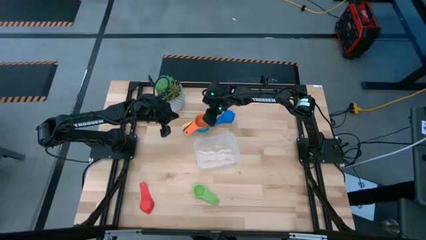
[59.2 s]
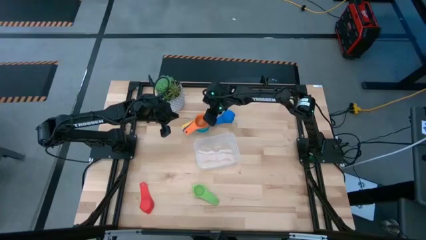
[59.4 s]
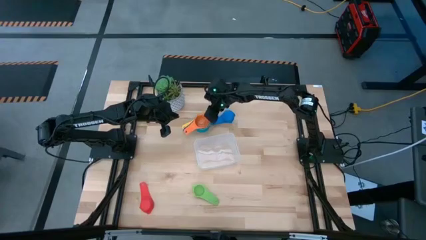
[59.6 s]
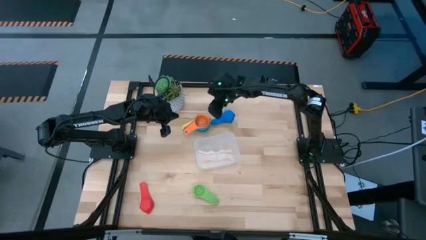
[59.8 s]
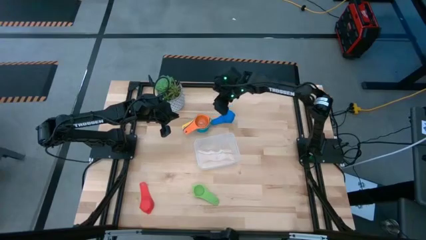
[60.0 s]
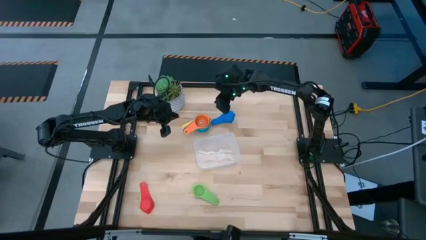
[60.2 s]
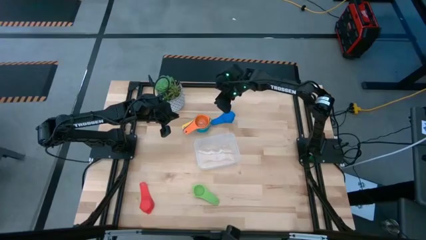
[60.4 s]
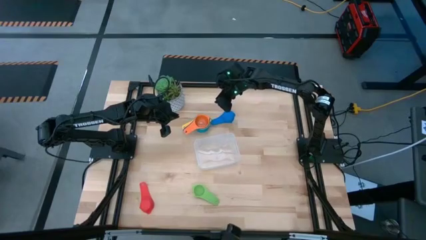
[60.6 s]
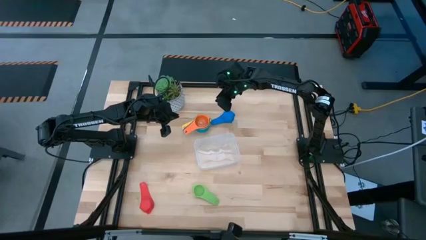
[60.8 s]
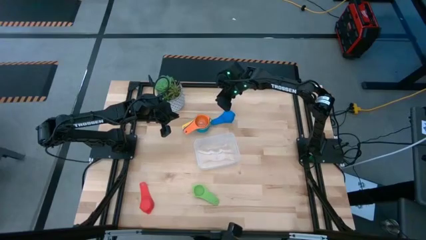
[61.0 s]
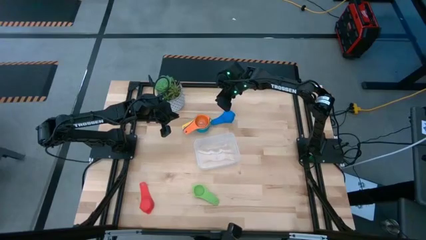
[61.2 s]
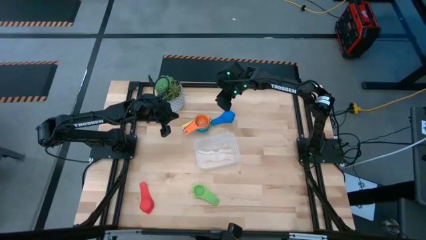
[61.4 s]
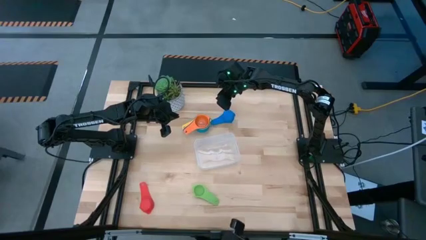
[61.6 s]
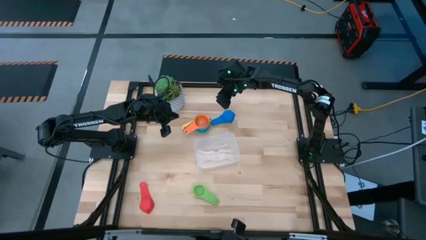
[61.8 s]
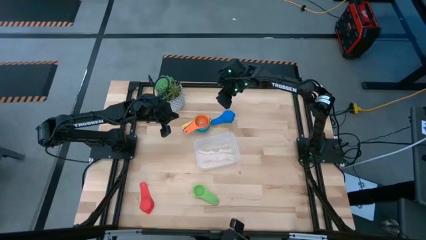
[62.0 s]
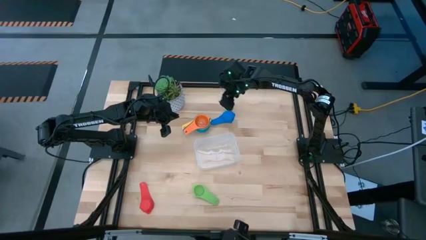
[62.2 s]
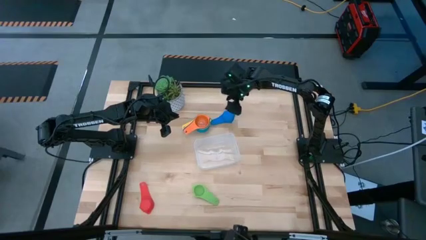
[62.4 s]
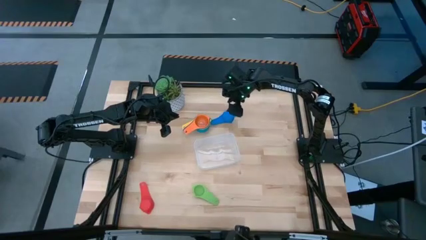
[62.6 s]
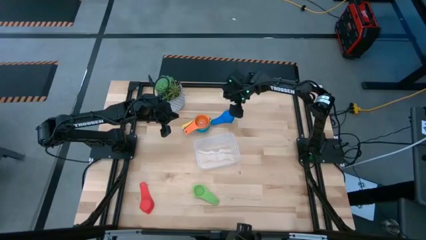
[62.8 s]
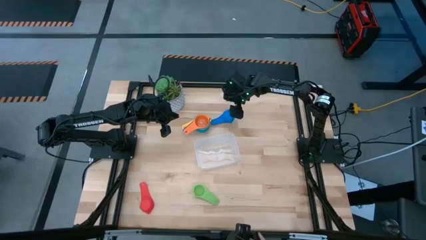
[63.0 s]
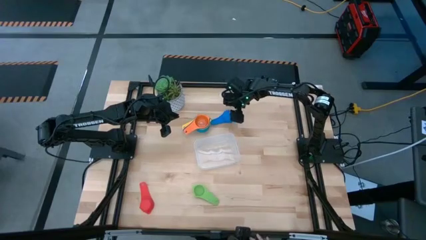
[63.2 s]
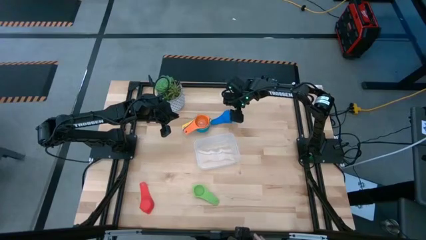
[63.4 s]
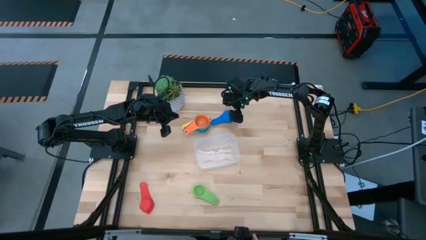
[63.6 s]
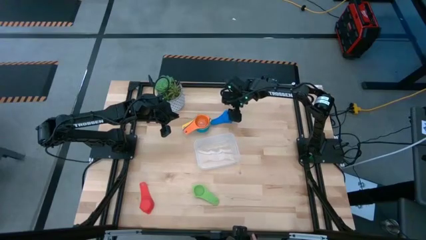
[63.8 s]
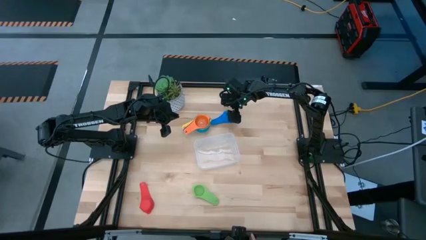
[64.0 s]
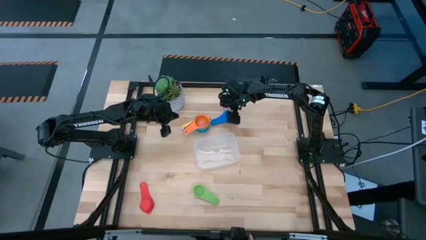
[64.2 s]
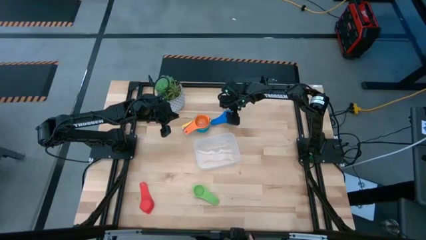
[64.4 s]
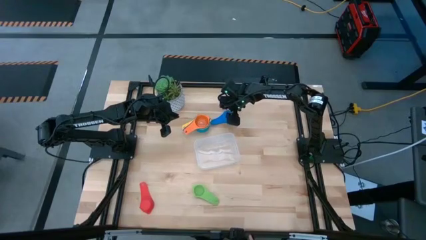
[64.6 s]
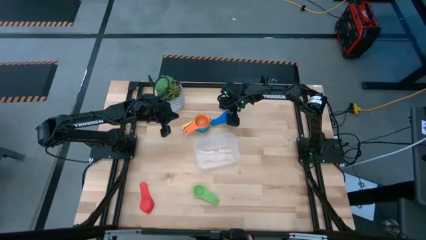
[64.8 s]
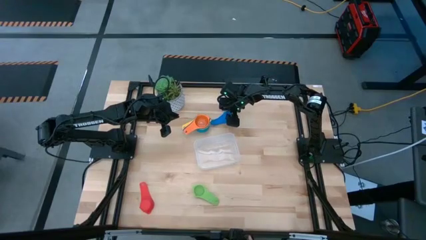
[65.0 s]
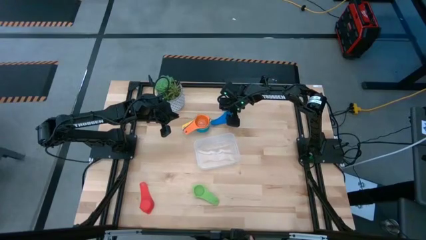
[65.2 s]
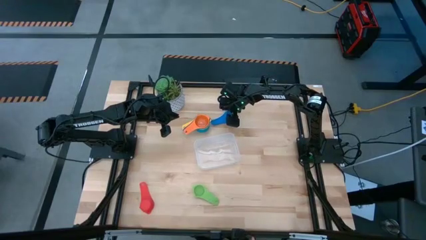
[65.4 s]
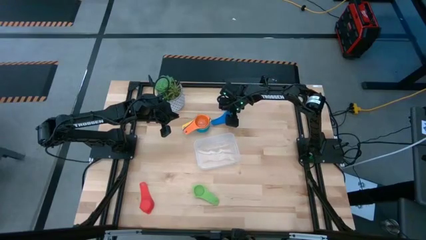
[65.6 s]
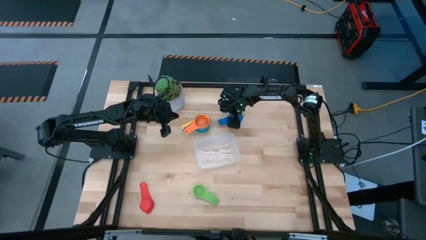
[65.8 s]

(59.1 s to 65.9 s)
Task: Nest measuring cups in basket
Stack the blue measuring cup on top of the orange measuring cup

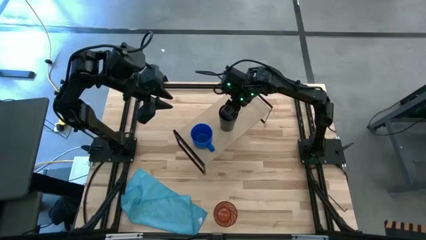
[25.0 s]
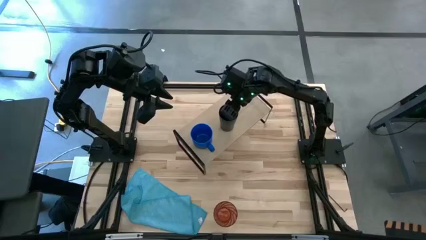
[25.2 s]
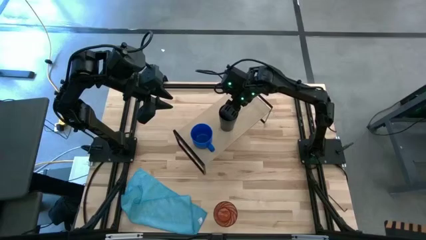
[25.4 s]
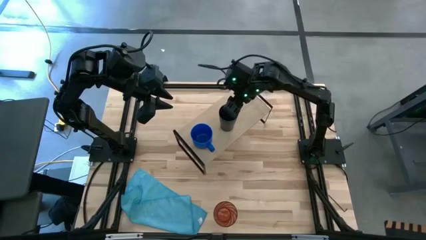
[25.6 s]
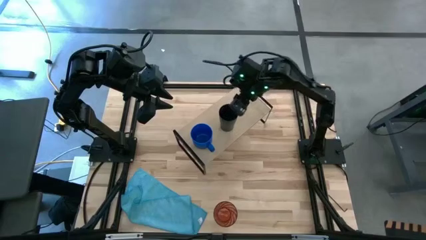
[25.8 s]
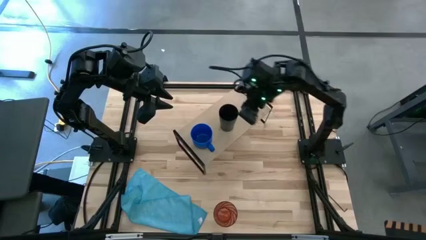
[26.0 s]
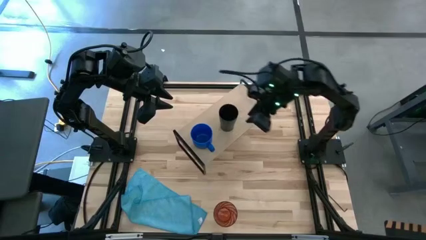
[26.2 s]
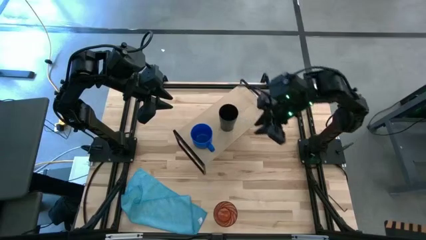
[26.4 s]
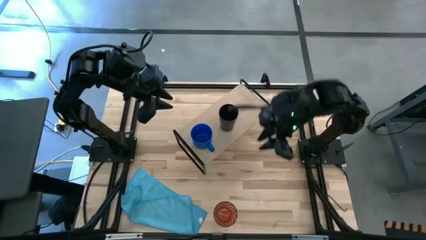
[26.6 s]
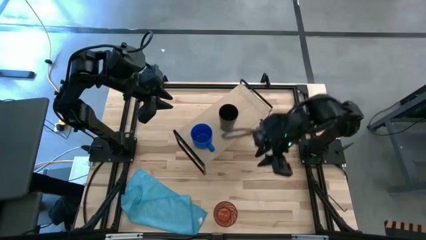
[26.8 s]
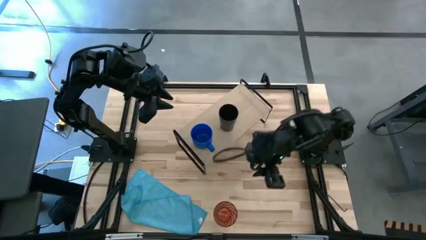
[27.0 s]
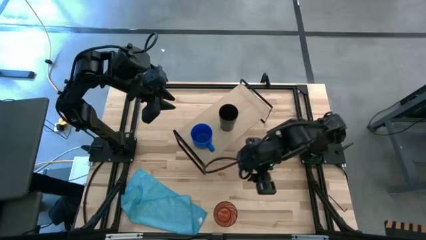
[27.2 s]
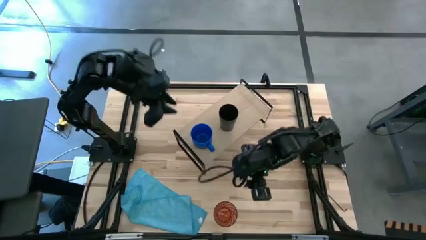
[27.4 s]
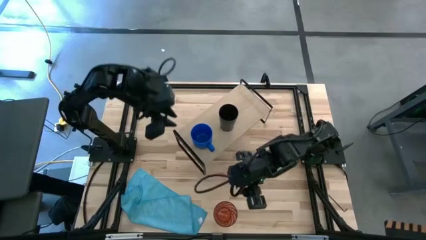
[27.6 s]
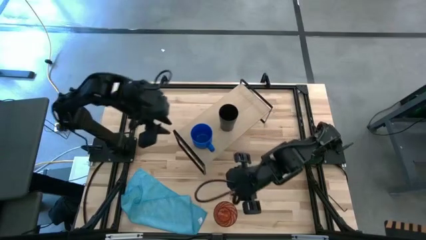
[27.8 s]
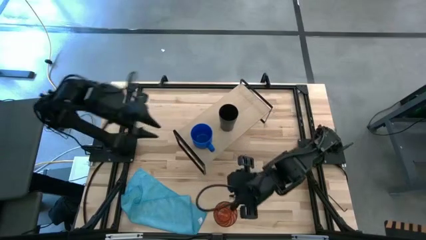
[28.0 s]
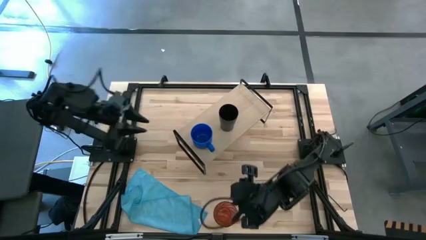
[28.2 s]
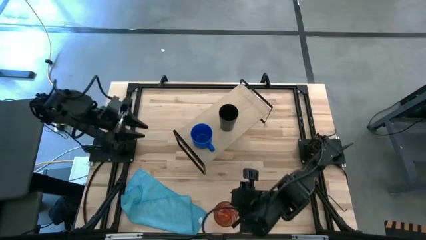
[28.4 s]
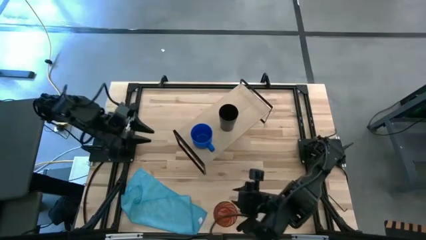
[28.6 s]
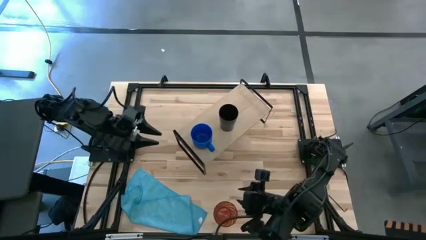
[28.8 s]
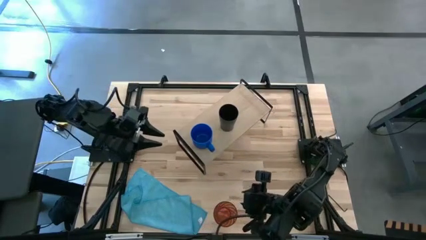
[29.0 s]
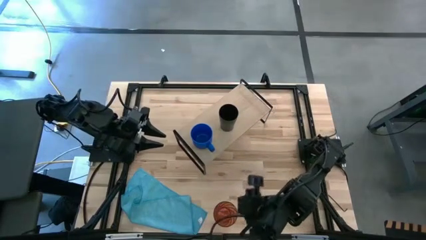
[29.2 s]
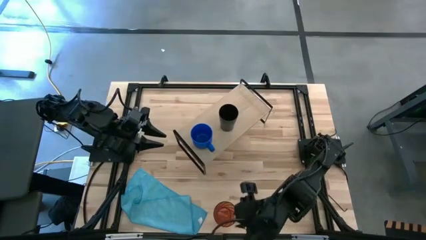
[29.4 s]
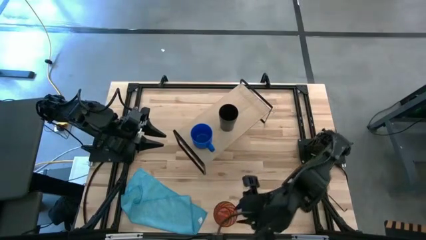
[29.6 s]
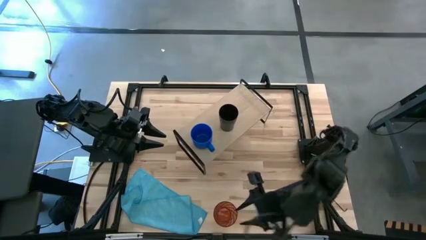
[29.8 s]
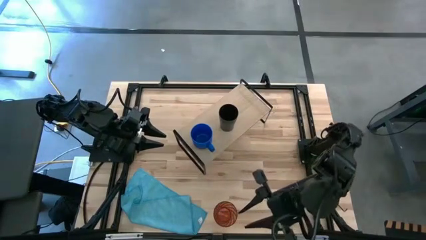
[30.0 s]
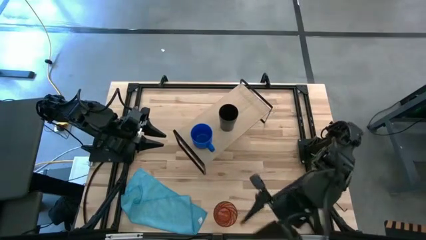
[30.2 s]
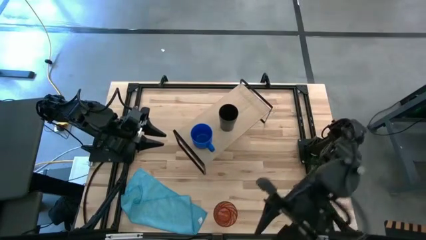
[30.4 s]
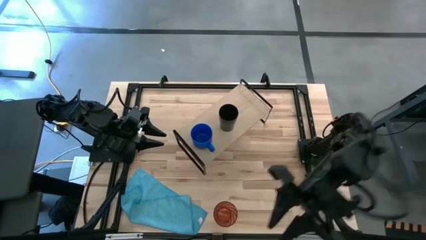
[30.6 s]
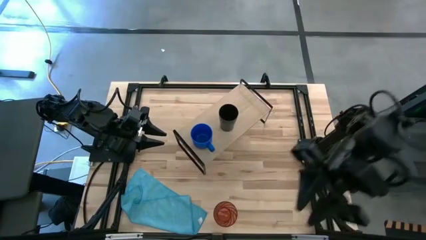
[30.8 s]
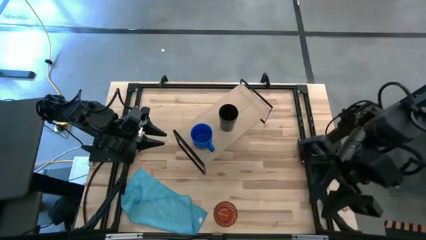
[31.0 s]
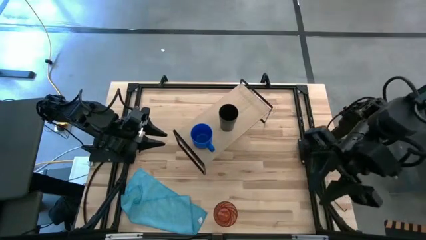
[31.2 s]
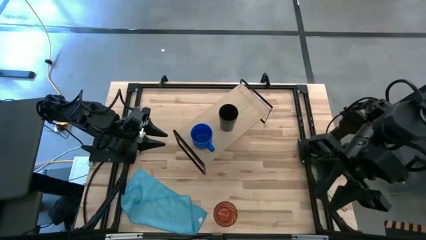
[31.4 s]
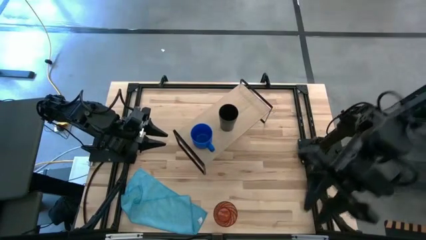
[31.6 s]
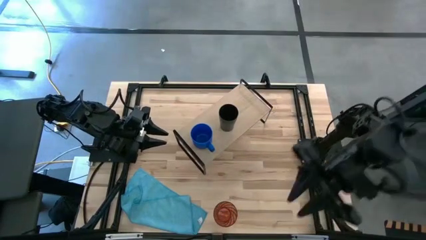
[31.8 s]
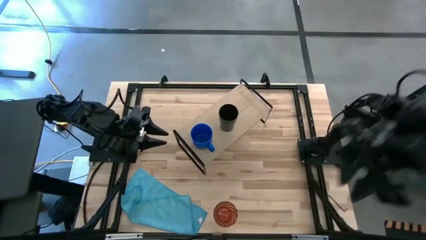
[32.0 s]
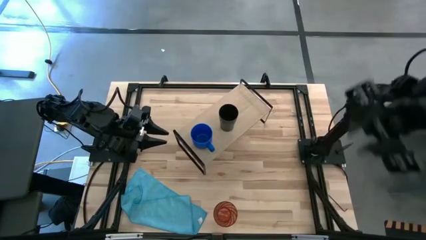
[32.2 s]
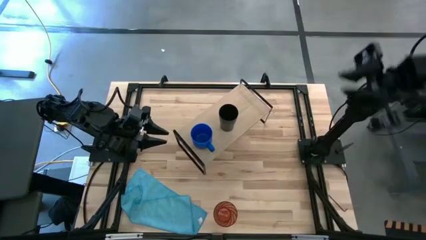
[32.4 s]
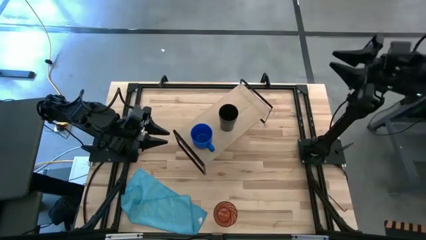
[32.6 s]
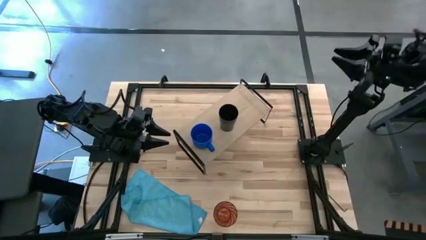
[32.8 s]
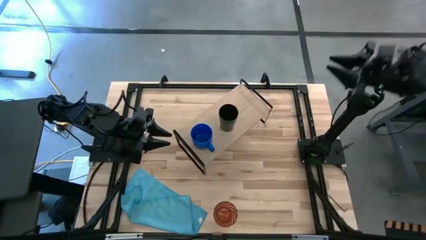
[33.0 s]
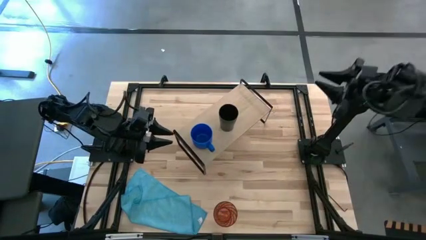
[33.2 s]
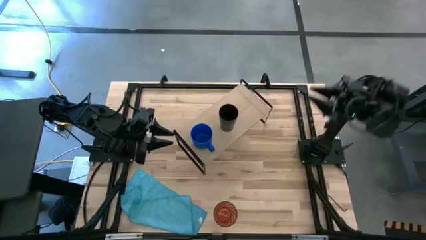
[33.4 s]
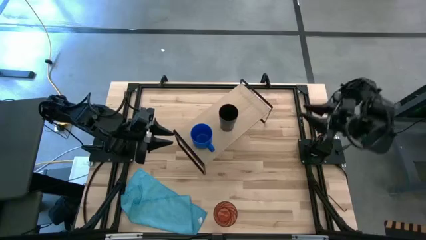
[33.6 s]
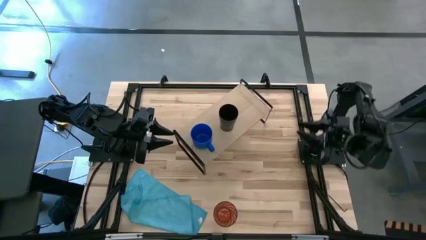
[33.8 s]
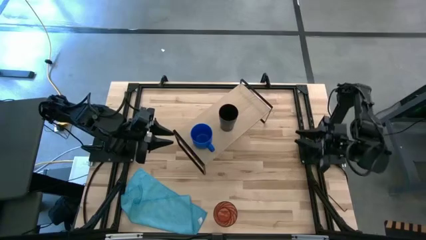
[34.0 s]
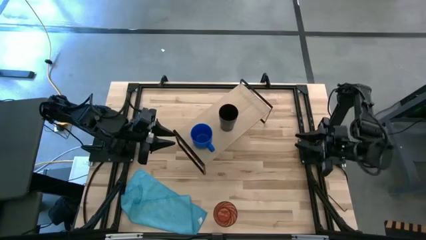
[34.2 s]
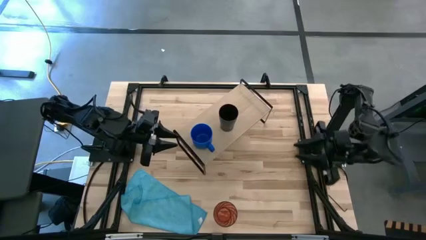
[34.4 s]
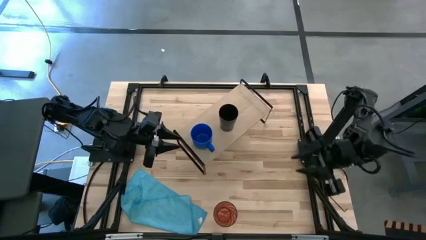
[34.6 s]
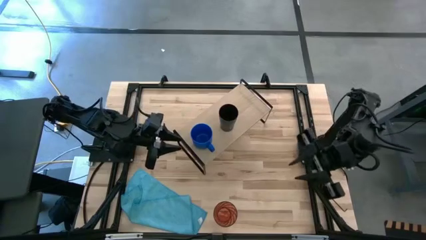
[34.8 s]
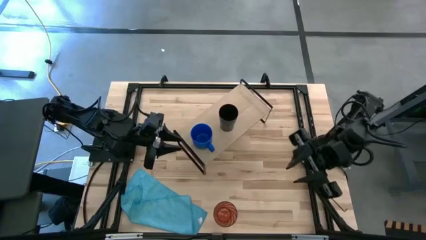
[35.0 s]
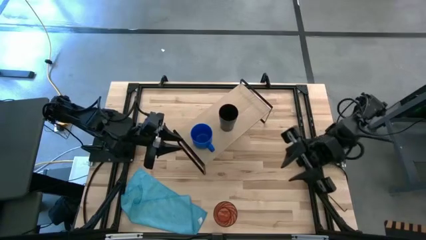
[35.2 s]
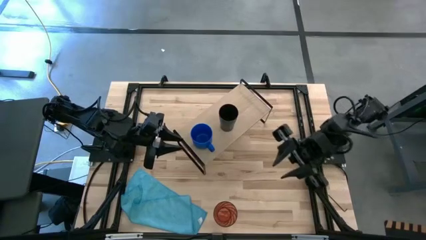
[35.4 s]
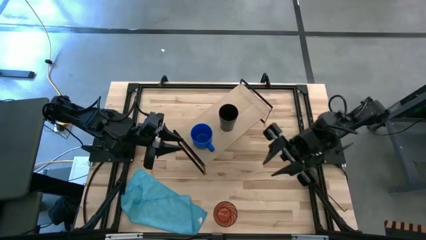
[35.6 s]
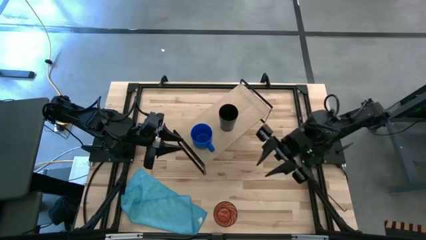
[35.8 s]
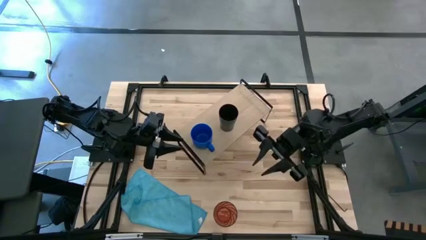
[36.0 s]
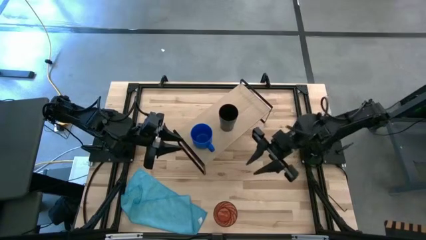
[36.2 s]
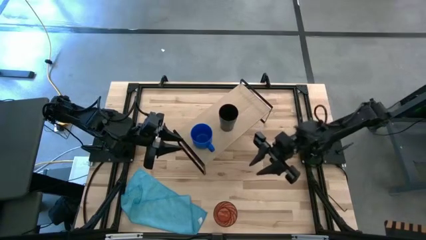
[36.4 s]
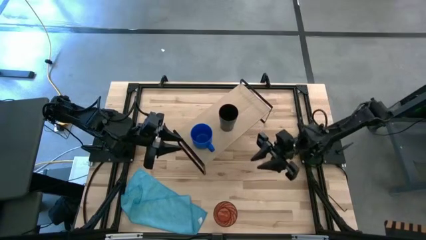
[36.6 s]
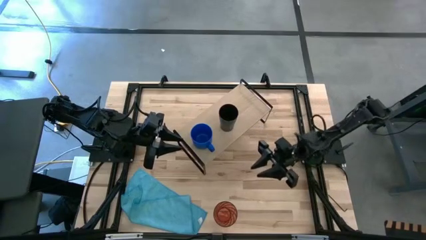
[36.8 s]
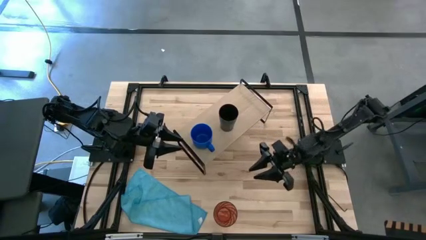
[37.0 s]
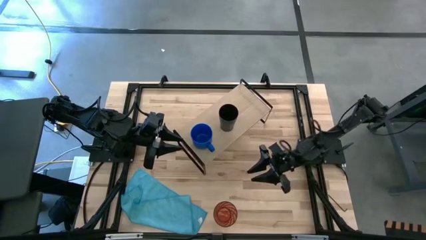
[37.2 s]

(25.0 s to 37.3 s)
Task: Stack small to large cups/mugs on shelf
Put the brown cup on the shelf
